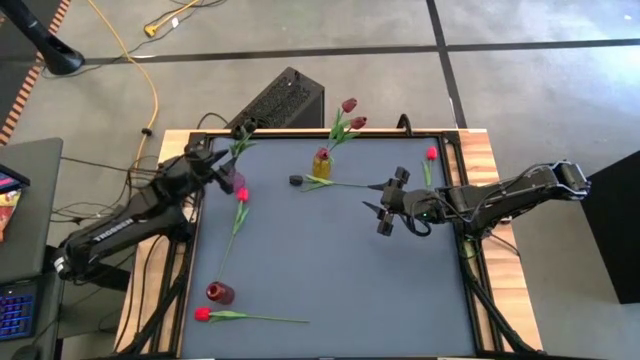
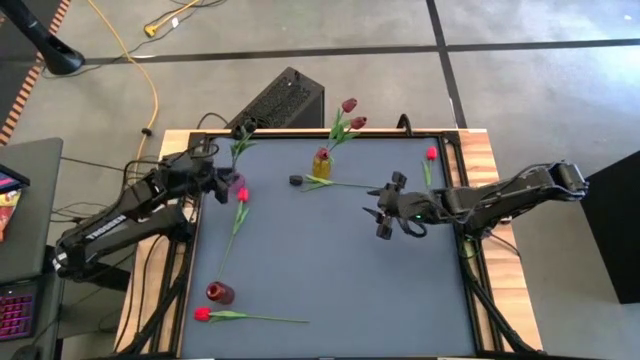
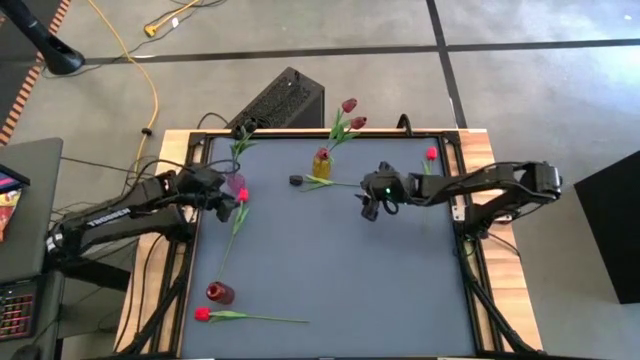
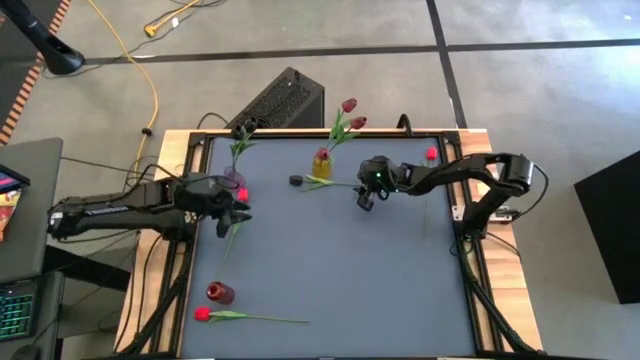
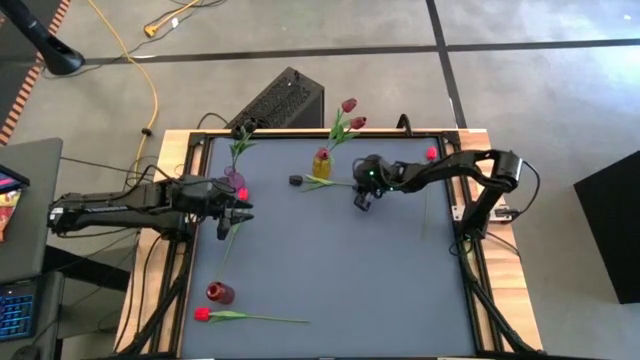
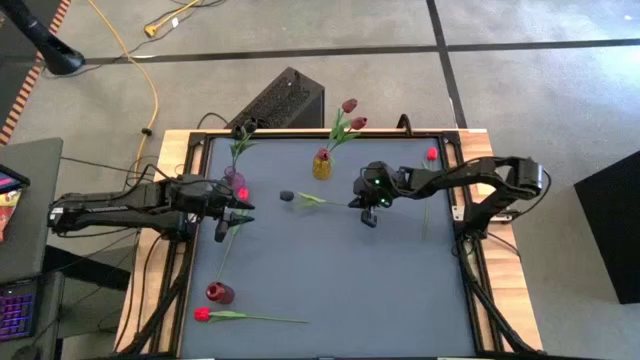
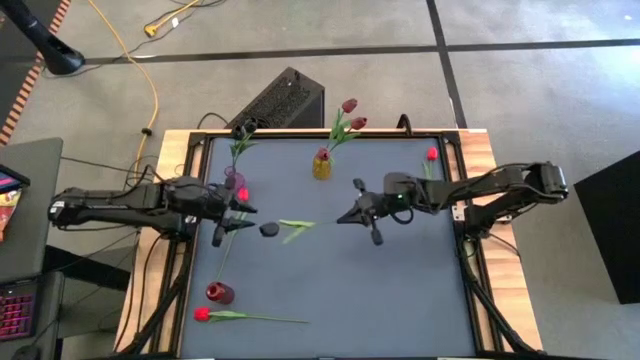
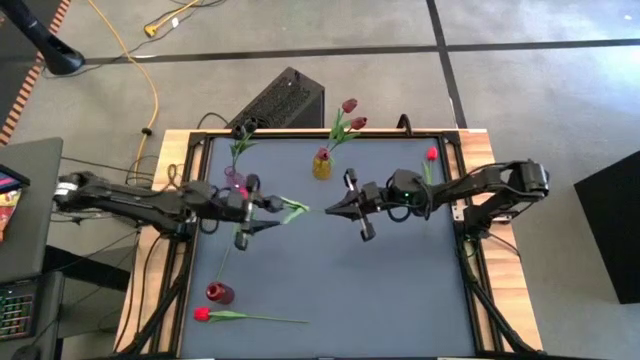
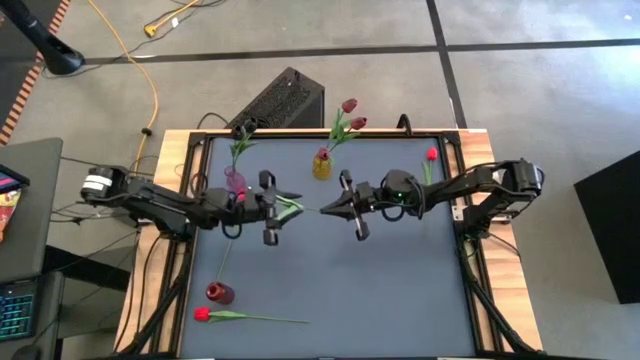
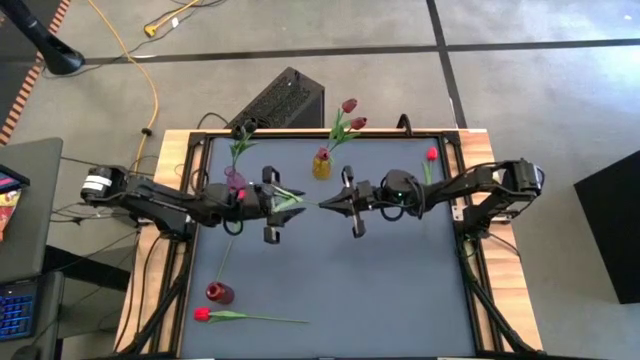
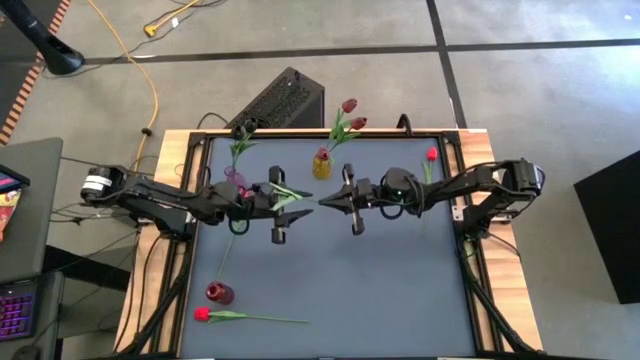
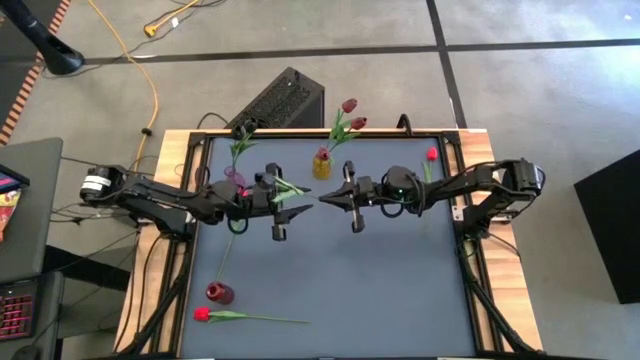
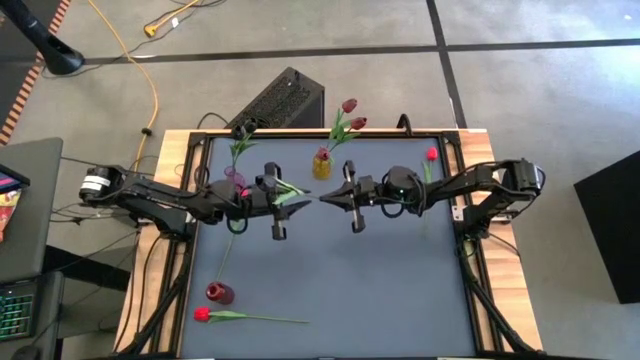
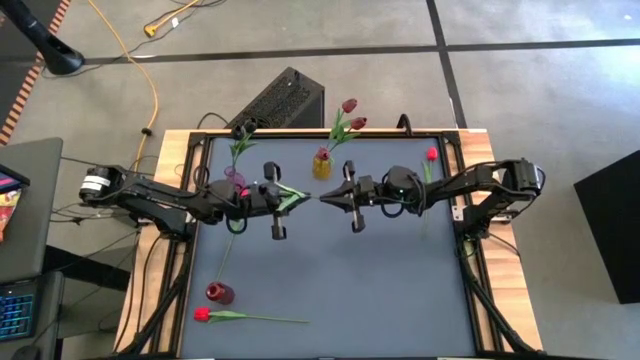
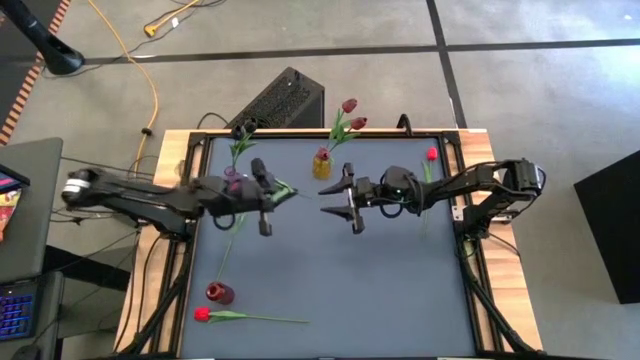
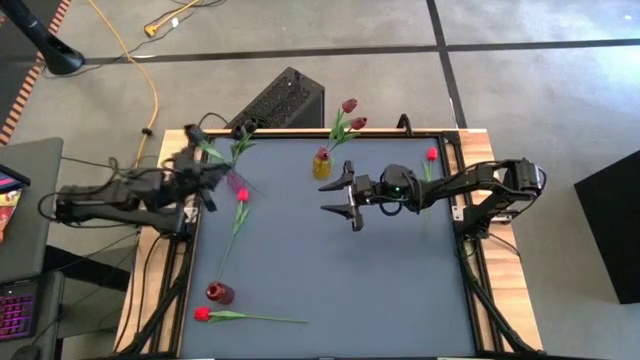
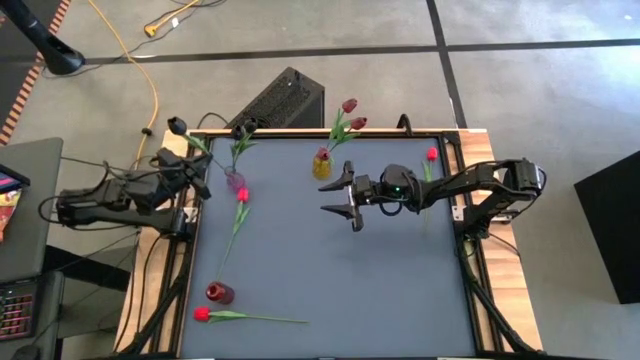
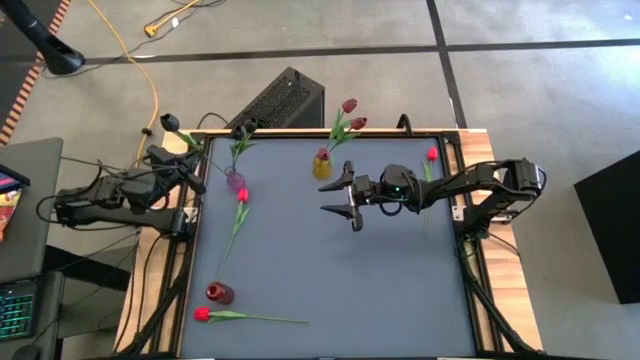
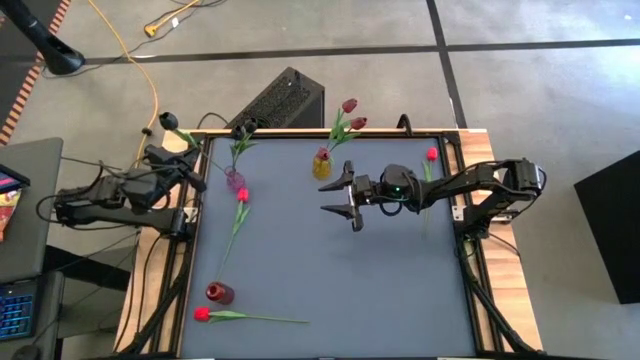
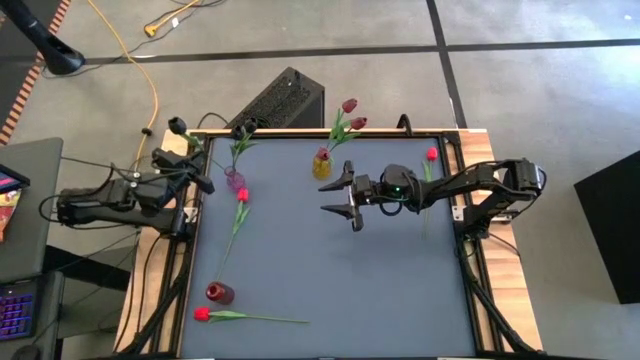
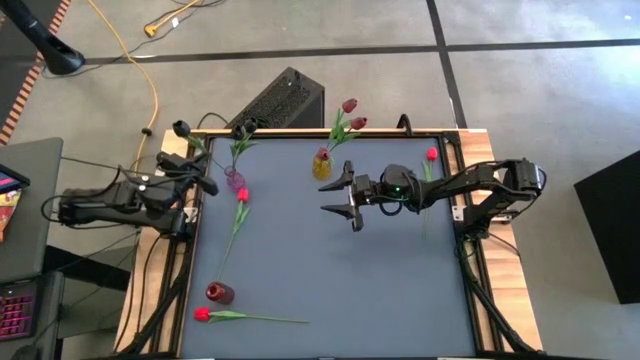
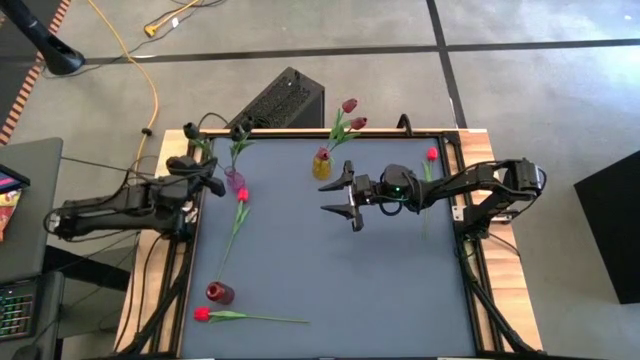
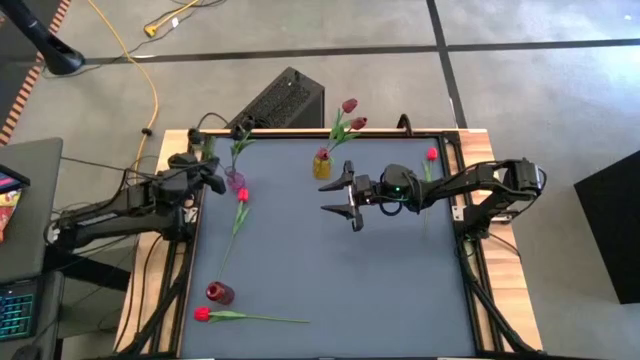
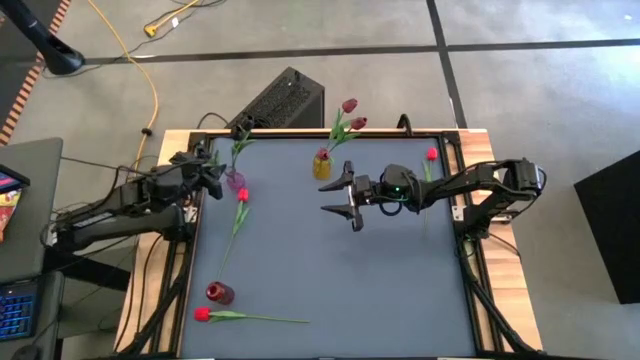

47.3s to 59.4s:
Task: Sort flowers into vase by color
Put the black flower into the purple vase

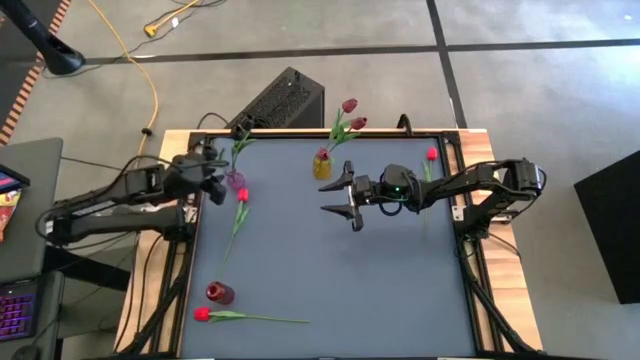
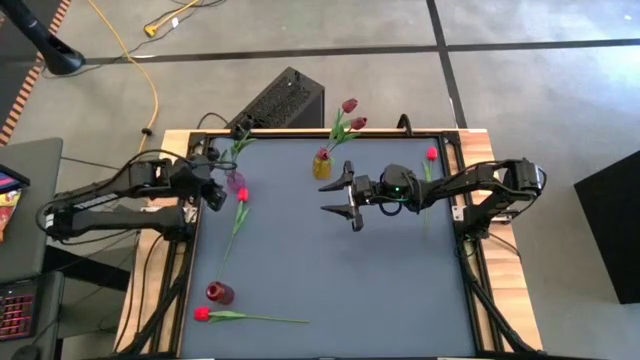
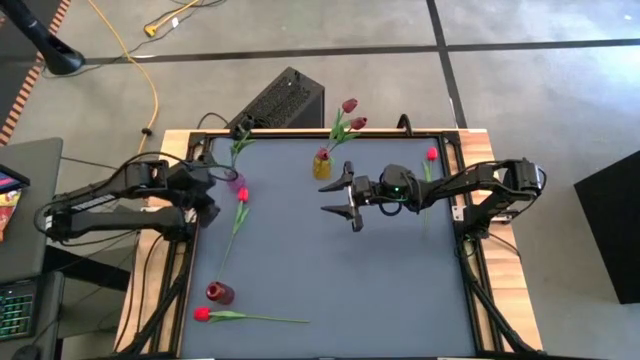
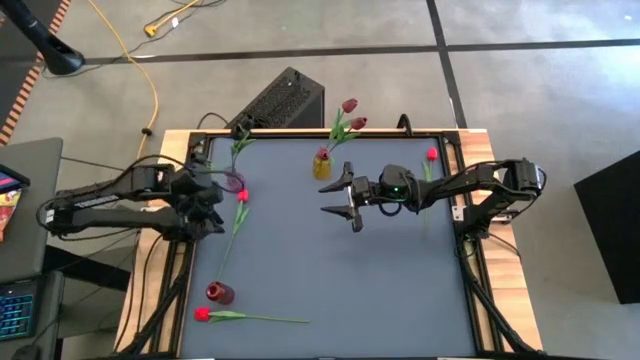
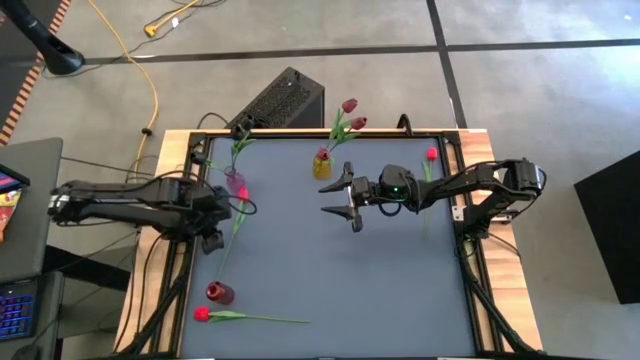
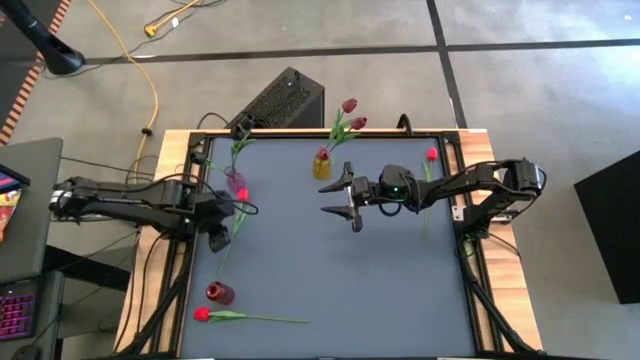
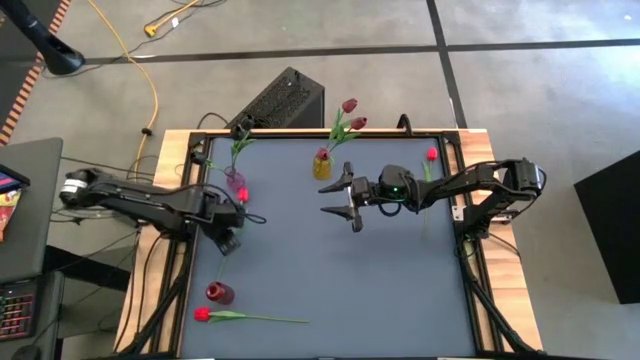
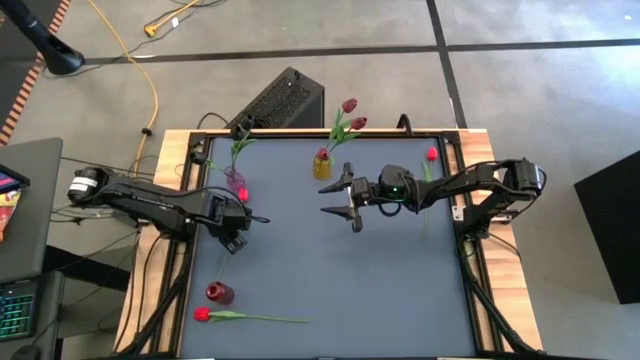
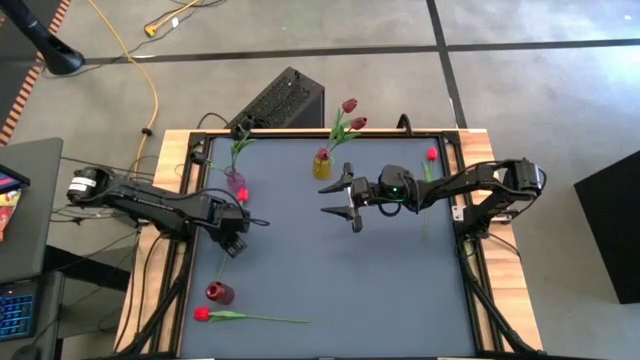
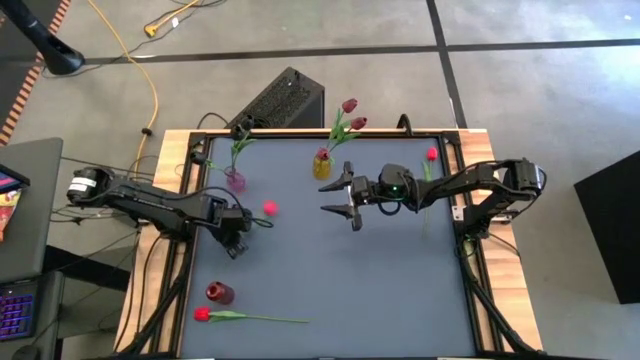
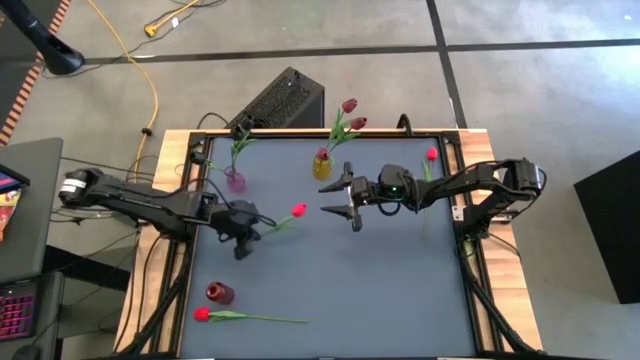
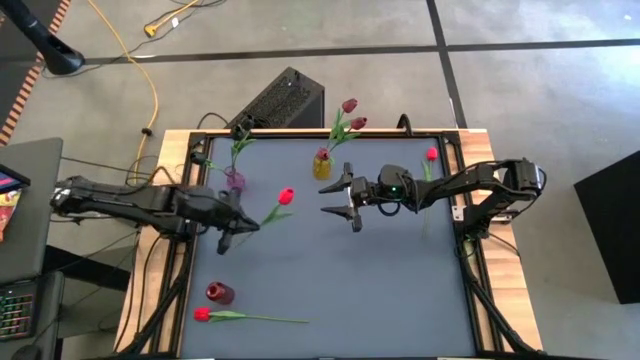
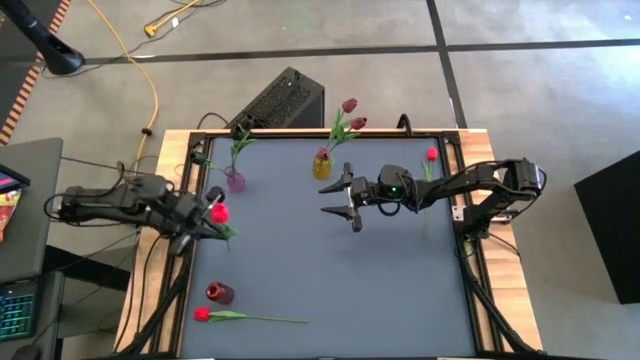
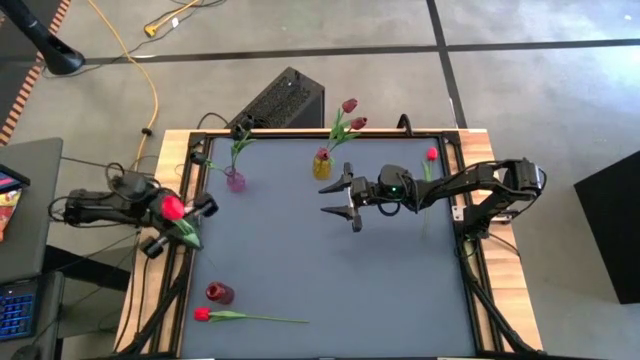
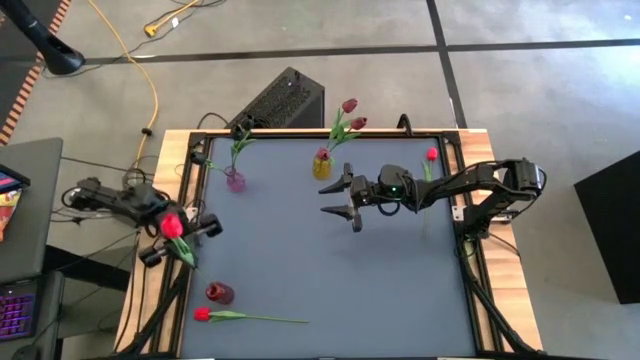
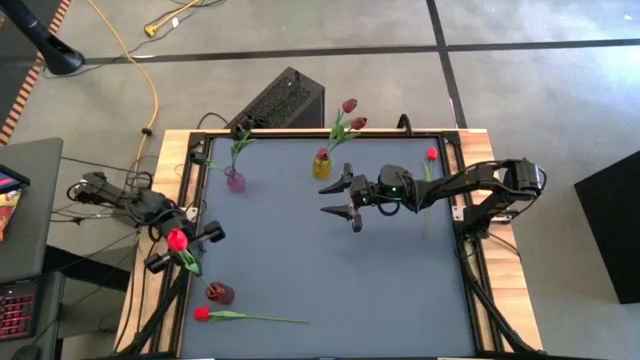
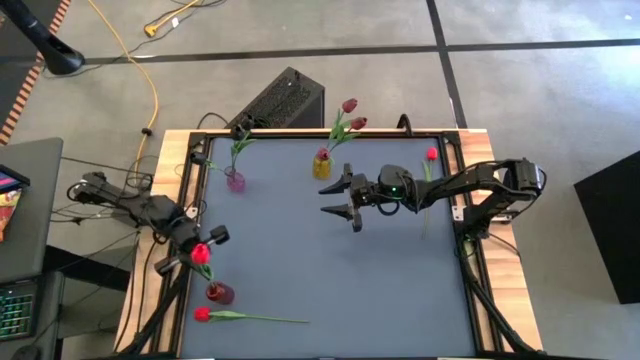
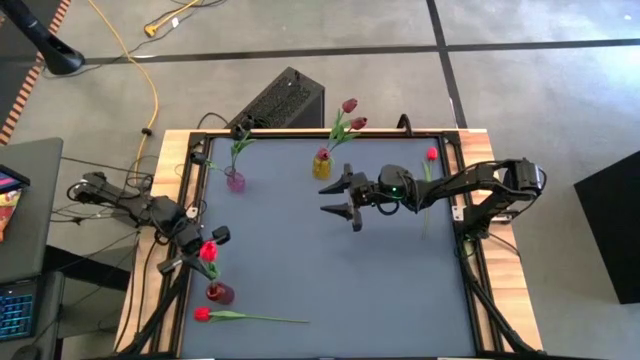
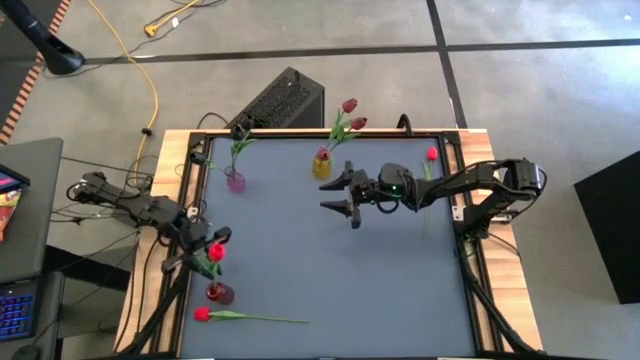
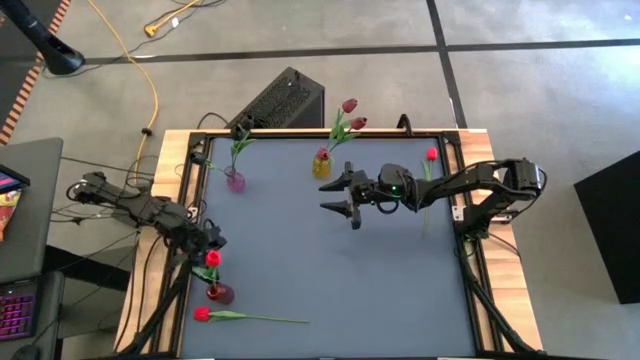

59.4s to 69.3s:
Put the top left red flower into the red vase
